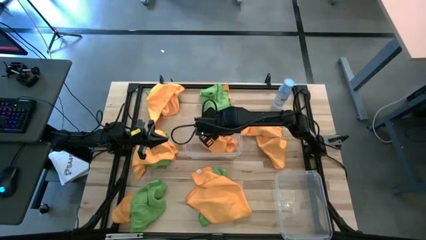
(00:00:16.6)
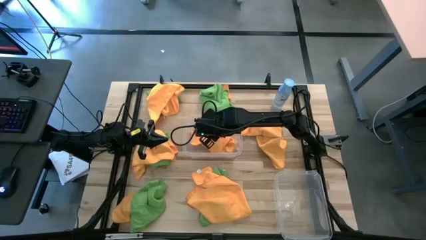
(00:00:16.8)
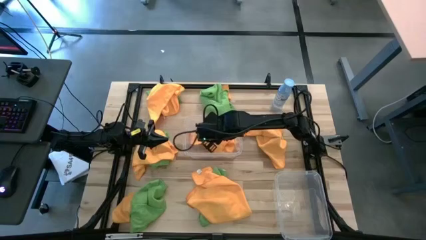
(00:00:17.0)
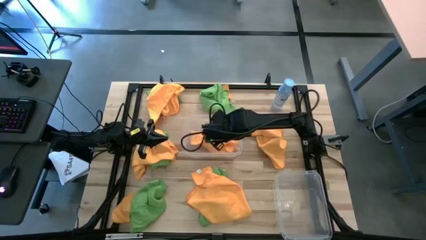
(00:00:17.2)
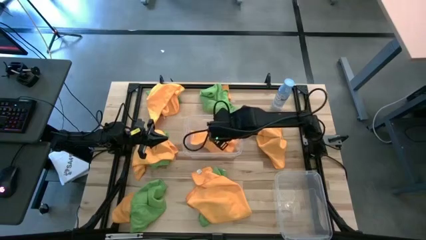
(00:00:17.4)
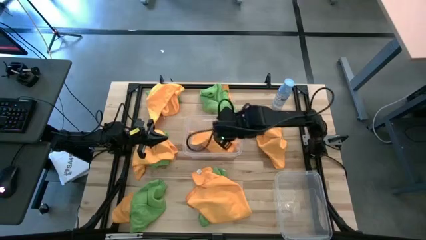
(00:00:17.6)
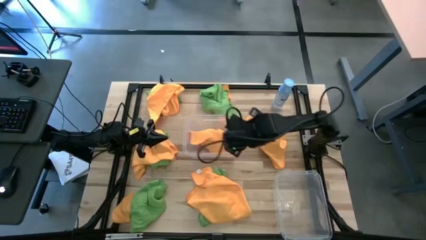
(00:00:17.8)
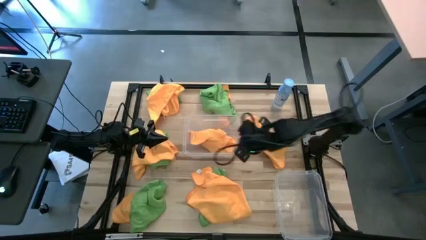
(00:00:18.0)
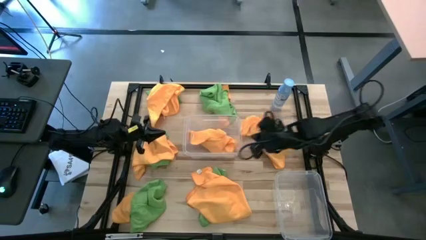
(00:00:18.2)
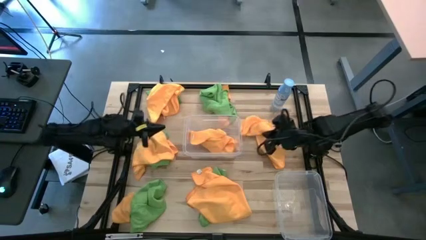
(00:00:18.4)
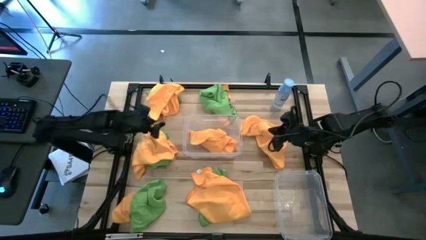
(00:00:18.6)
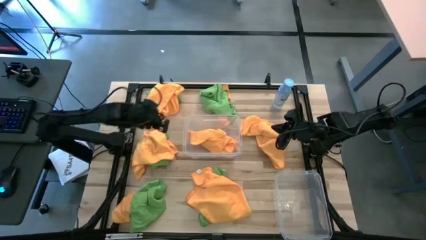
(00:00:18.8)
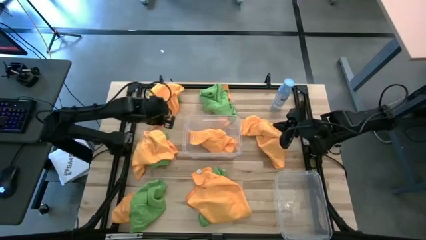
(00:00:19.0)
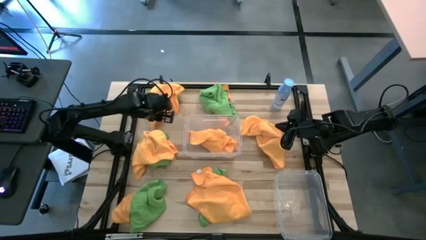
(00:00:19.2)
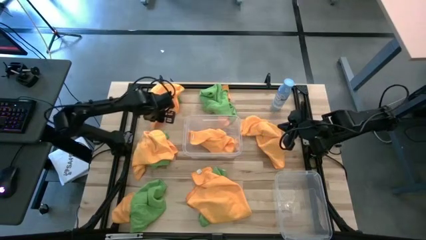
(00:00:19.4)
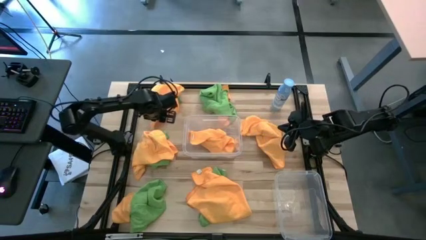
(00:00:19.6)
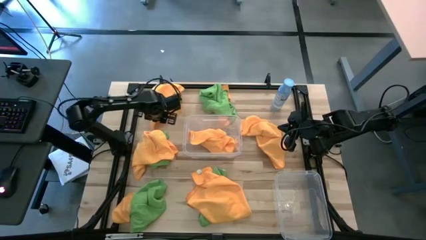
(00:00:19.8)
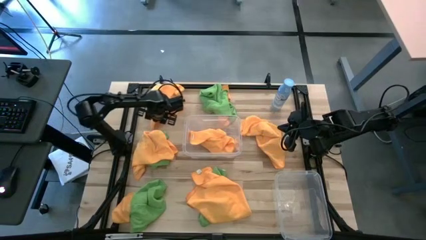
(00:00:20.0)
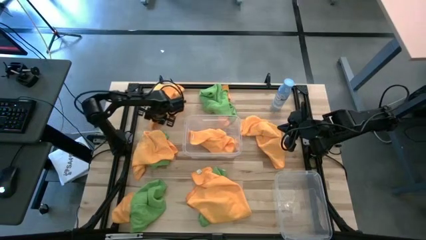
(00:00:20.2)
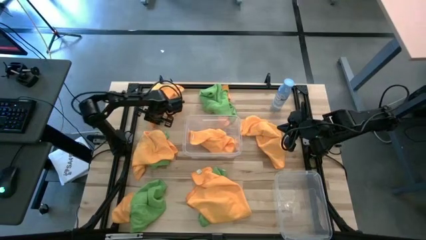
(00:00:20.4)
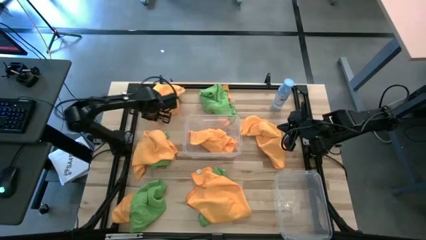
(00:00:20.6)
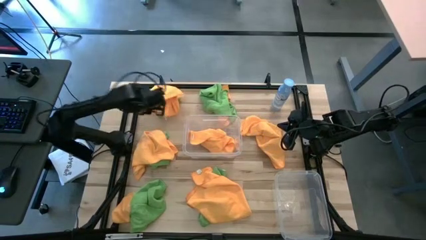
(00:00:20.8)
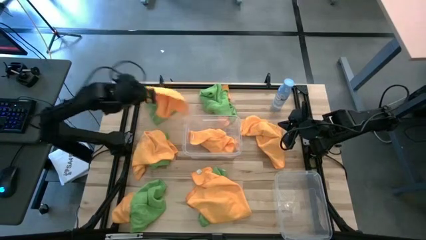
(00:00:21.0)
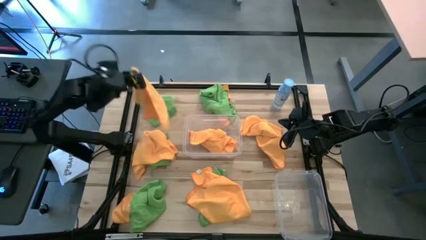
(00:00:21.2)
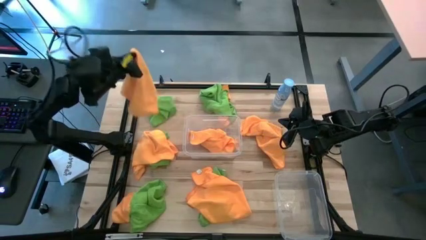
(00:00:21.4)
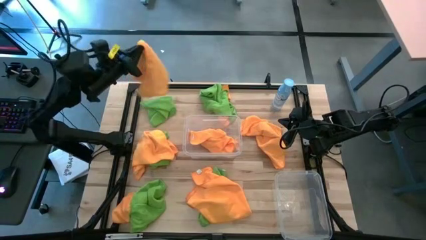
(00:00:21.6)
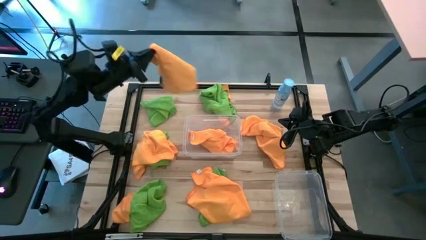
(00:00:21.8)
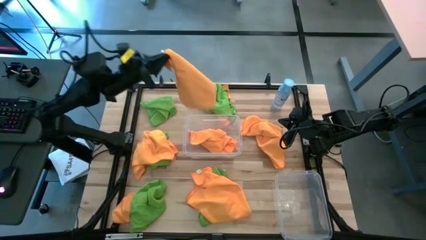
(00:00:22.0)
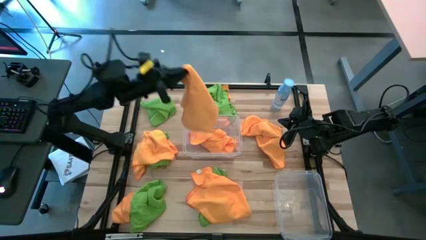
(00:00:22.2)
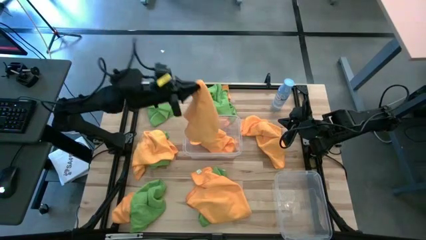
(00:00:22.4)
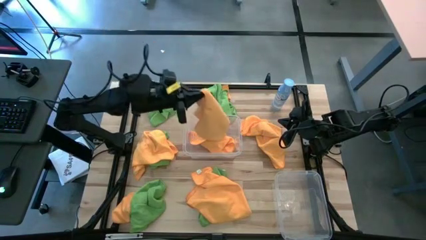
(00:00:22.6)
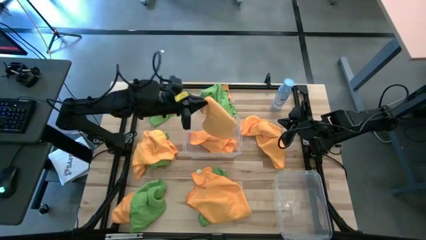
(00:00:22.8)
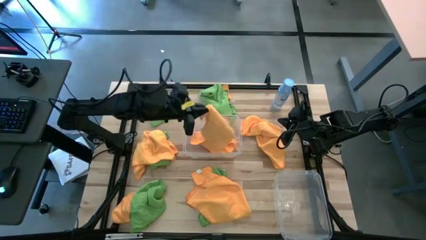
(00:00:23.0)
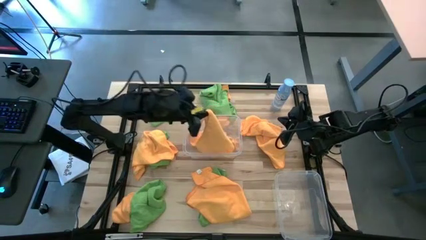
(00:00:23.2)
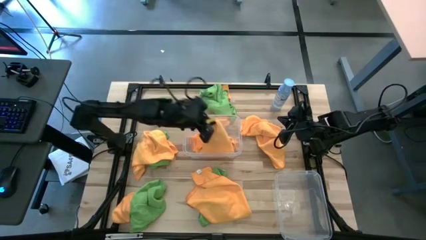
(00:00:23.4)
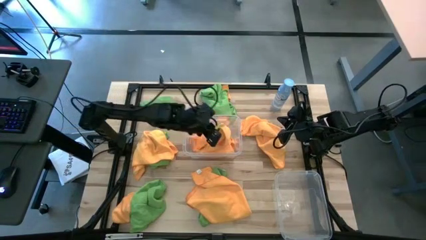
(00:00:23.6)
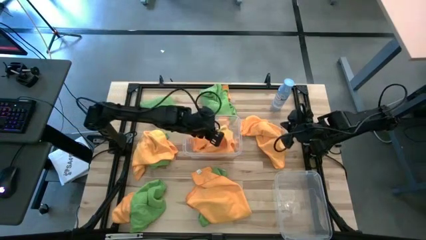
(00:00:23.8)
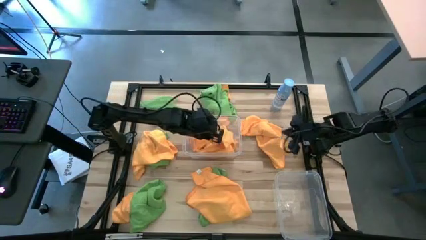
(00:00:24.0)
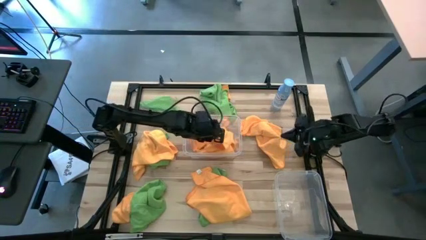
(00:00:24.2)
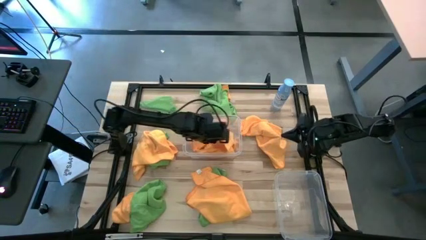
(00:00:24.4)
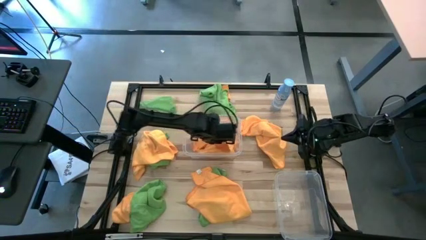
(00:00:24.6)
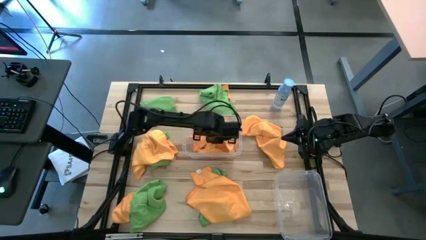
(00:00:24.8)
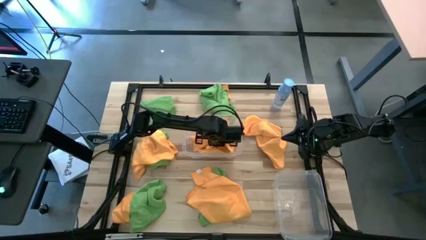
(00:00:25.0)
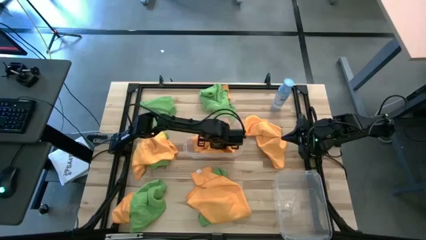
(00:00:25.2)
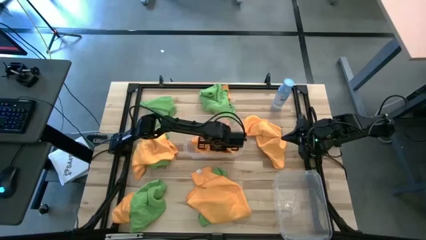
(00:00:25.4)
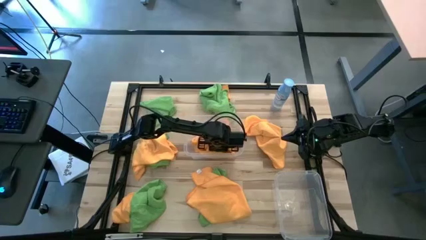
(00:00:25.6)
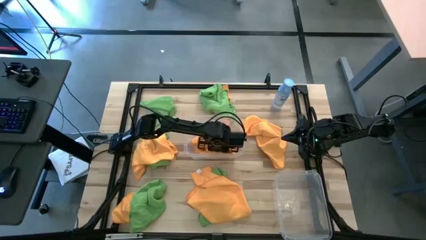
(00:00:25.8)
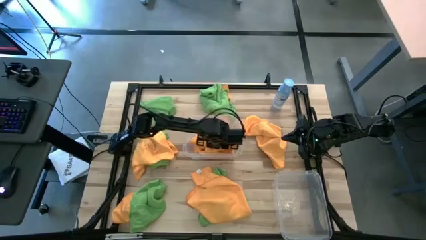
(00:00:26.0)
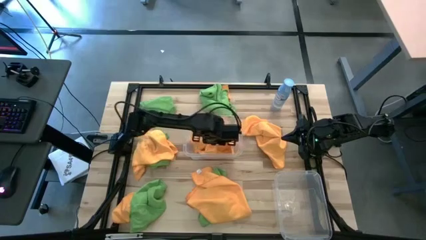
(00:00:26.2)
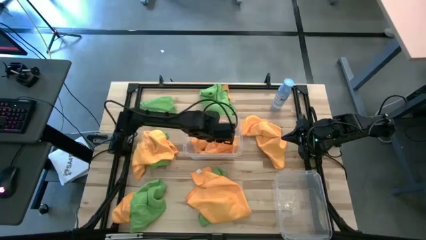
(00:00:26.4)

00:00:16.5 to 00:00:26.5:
Task: Sort microfiber towel by color & place in baskets
Put the yellow microfiber cloth into the top transparent bin

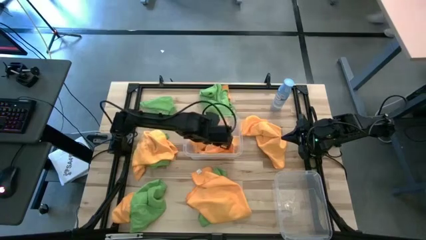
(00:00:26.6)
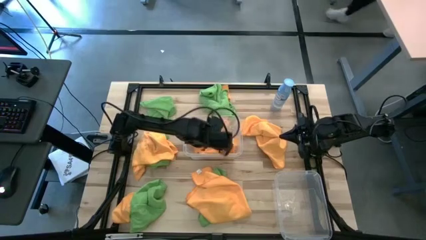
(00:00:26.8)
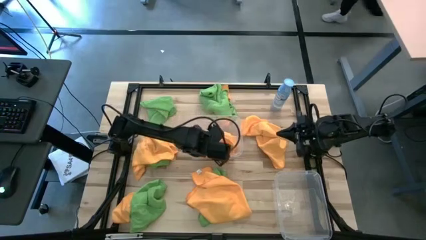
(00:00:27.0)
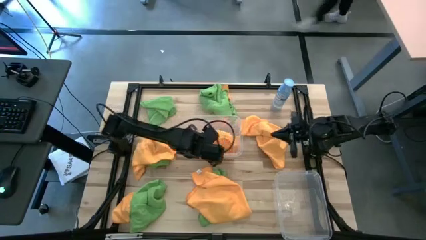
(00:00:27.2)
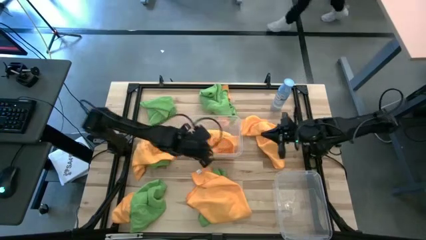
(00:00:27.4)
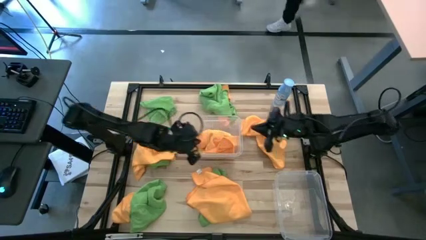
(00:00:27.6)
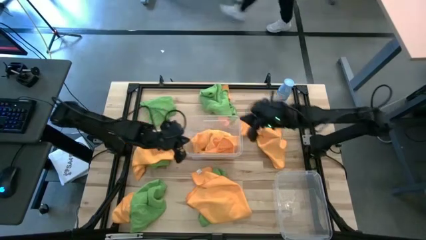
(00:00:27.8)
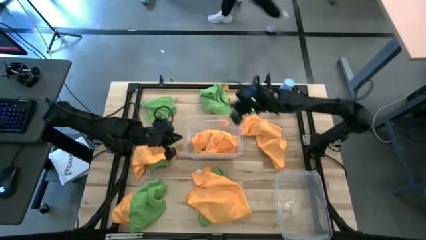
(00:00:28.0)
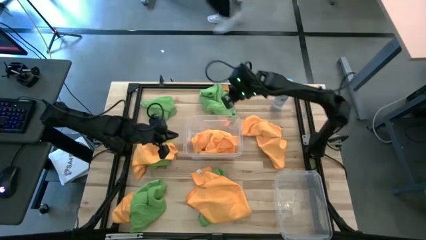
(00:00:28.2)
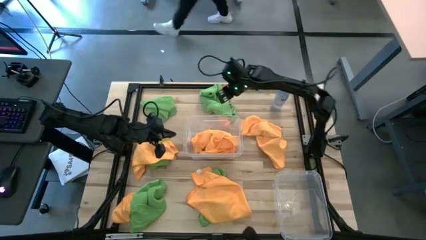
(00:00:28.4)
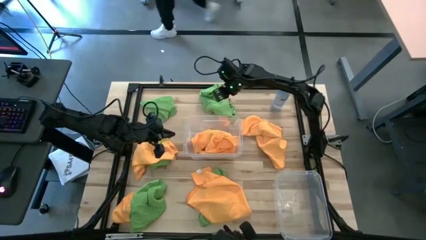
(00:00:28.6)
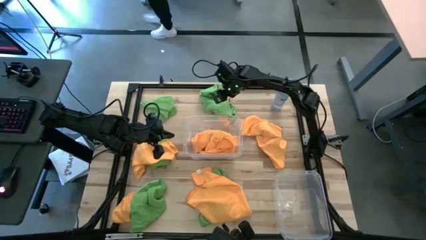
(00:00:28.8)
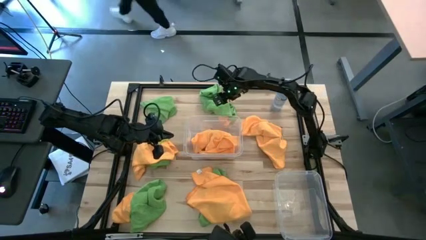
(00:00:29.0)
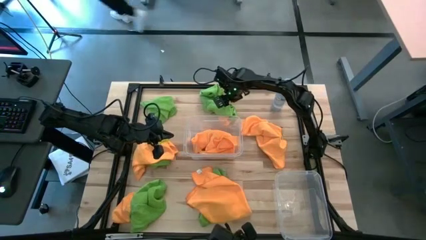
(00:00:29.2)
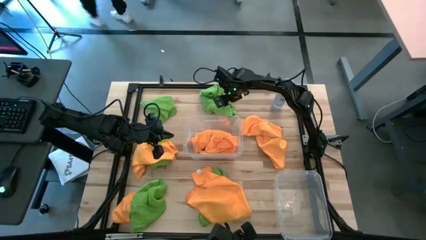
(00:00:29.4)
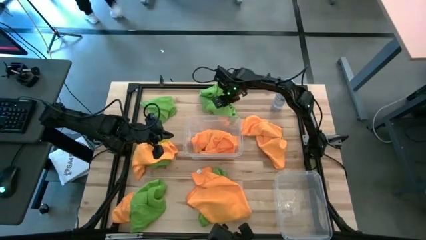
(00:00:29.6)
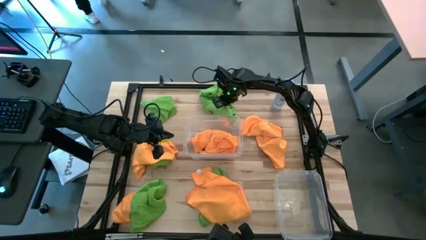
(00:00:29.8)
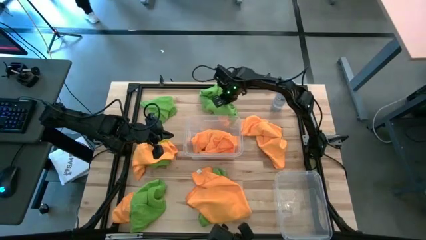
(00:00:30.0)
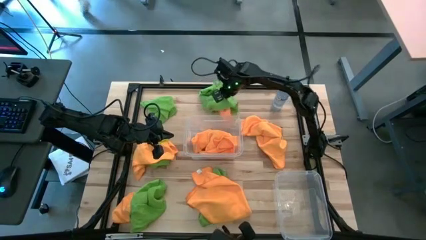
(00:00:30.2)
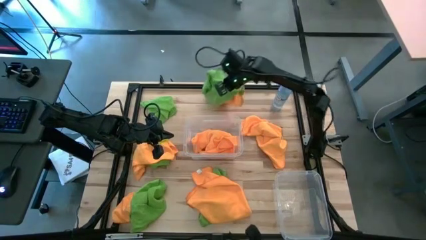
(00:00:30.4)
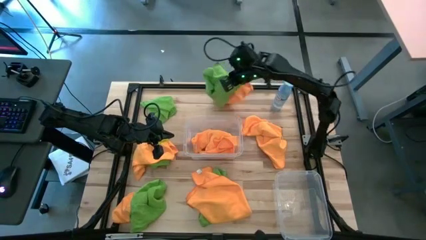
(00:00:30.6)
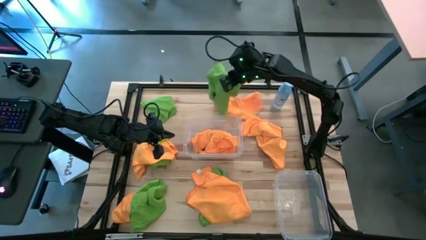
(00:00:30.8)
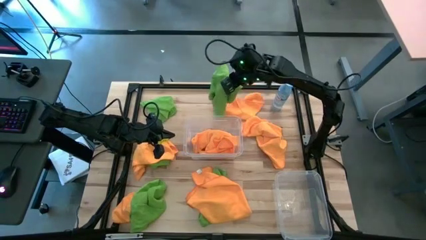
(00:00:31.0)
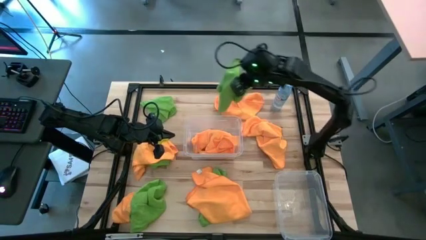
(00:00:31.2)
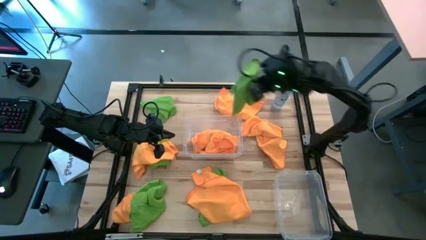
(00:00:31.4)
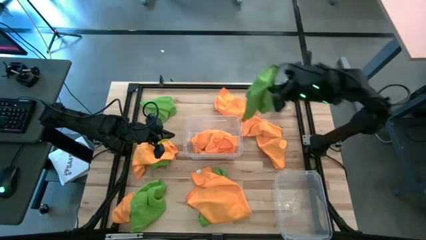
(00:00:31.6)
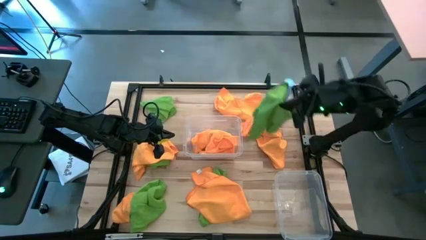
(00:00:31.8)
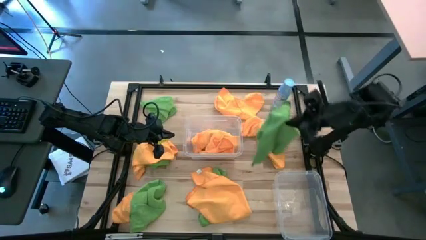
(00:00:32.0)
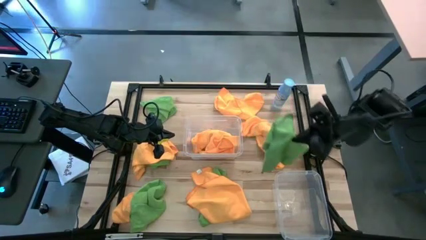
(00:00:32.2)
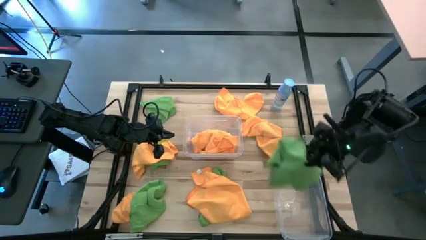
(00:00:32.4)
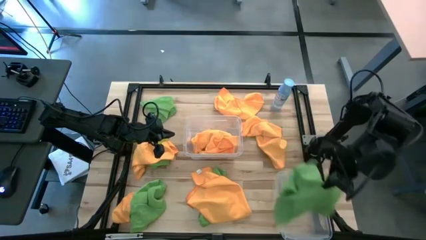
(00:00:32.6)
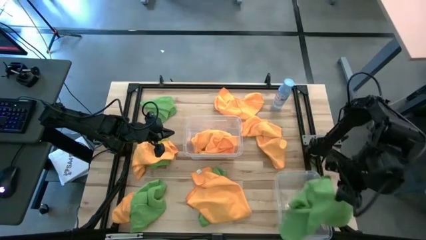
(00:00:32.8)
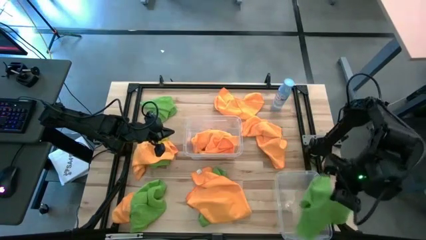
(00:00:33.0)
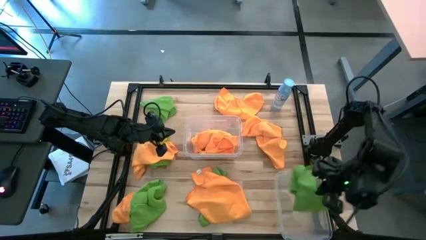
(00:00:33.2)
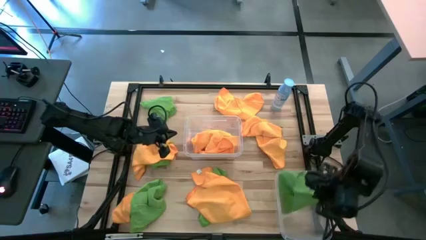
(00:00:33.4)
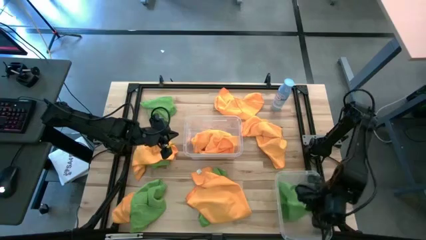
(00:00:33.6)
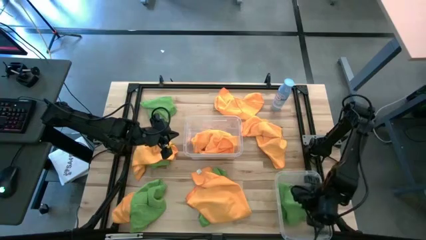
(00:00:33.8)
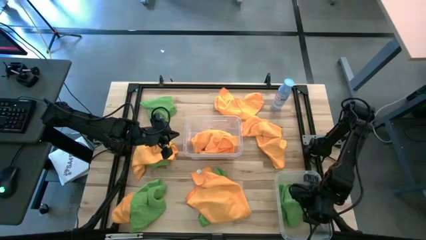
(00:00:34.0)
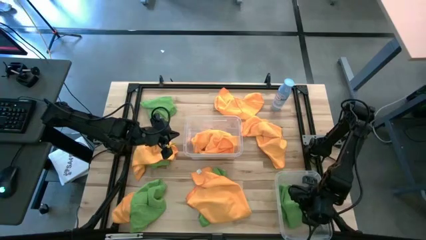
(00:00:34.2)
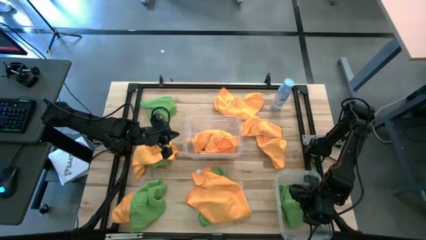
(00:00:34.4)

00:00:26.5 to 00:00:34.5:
Put the green microfiber cloth into the bottom transparent bin
